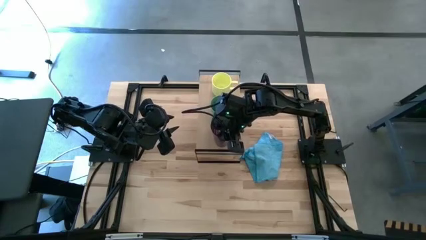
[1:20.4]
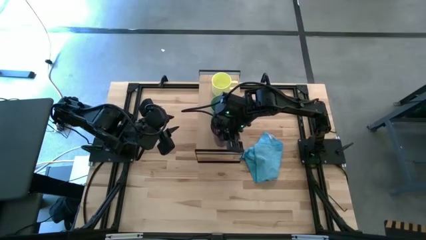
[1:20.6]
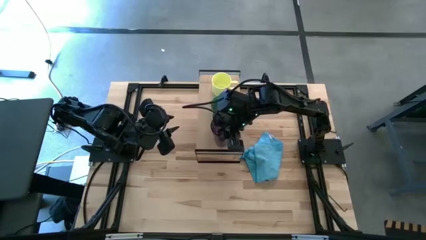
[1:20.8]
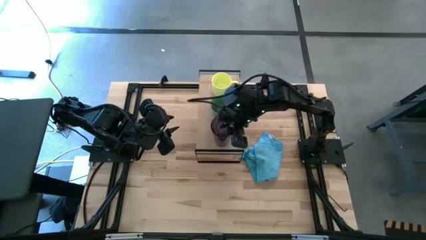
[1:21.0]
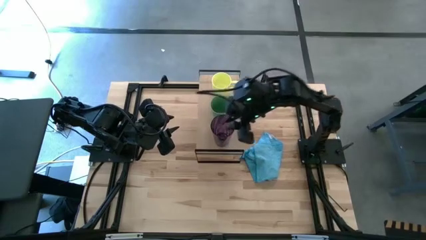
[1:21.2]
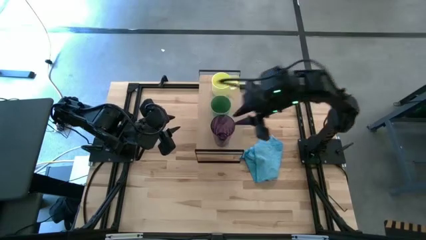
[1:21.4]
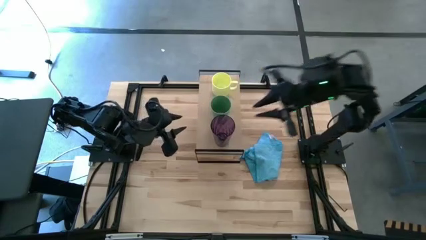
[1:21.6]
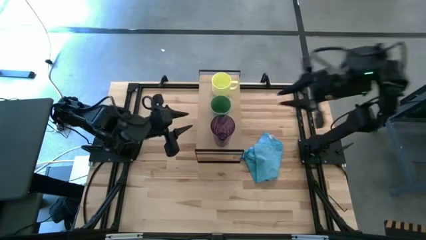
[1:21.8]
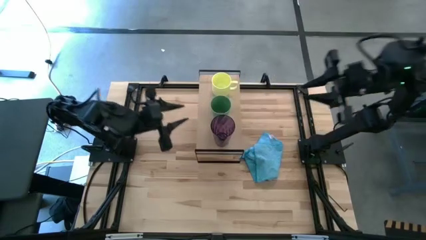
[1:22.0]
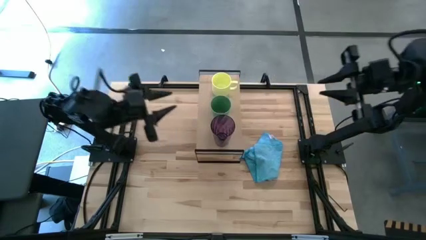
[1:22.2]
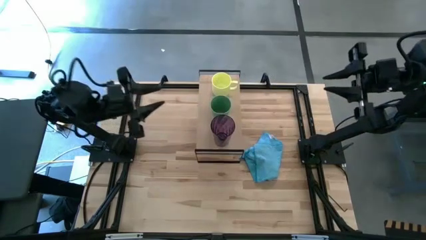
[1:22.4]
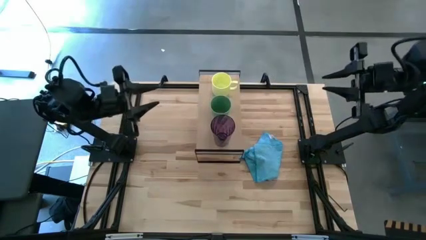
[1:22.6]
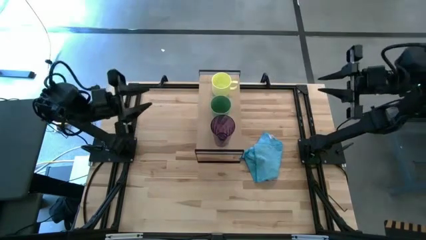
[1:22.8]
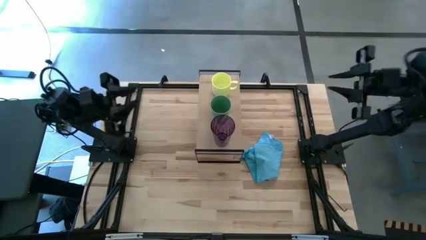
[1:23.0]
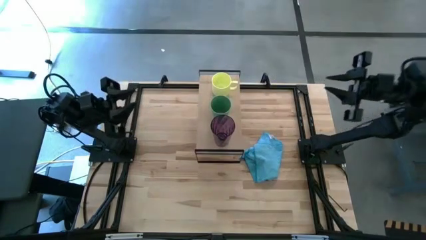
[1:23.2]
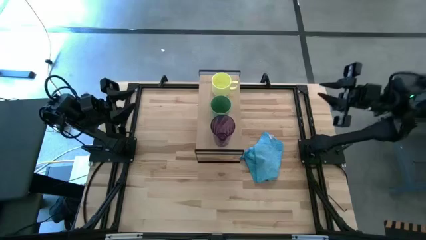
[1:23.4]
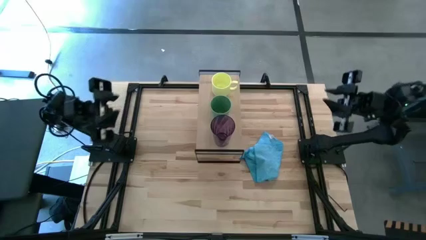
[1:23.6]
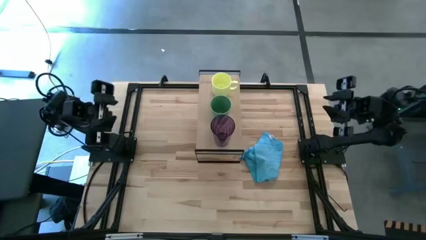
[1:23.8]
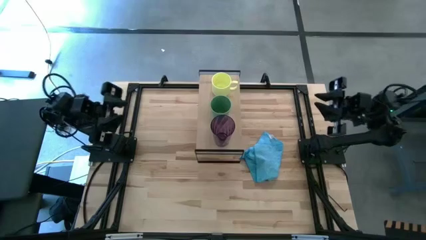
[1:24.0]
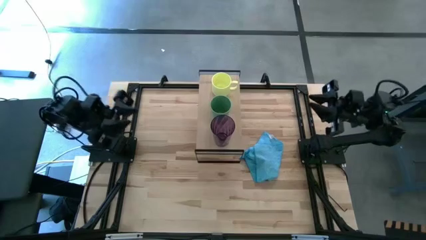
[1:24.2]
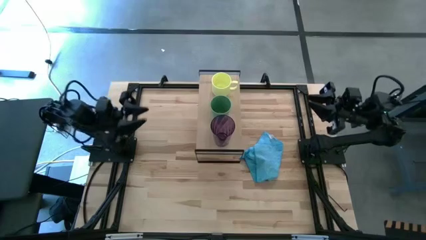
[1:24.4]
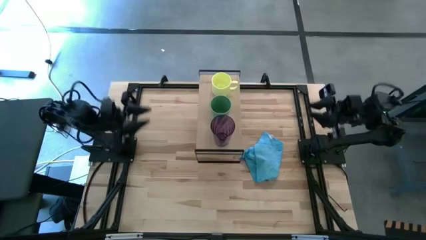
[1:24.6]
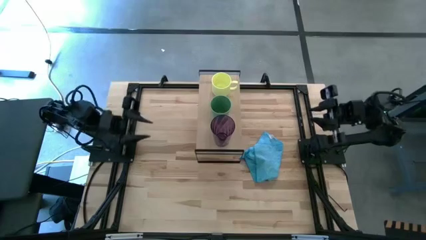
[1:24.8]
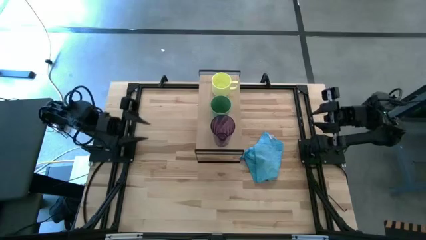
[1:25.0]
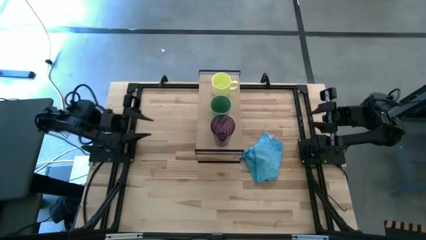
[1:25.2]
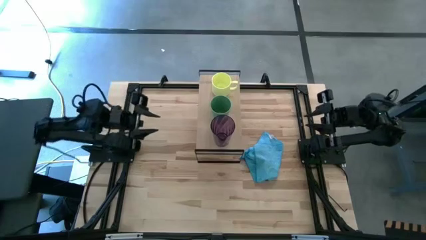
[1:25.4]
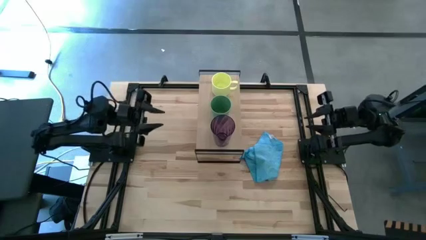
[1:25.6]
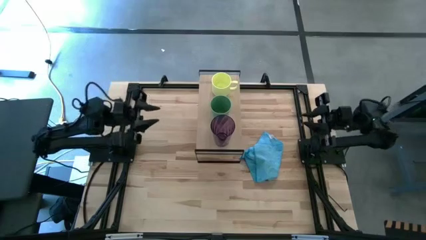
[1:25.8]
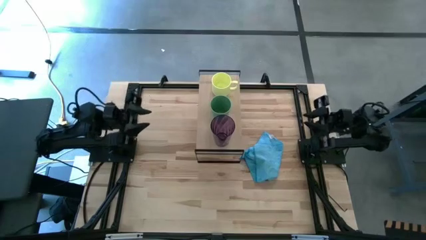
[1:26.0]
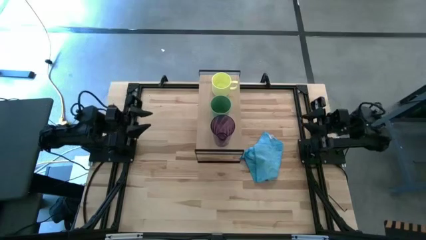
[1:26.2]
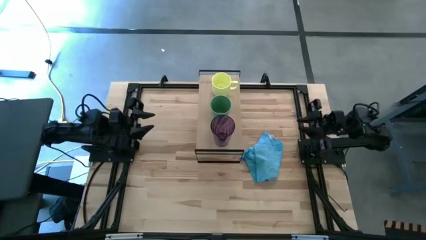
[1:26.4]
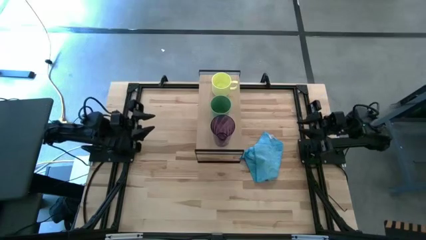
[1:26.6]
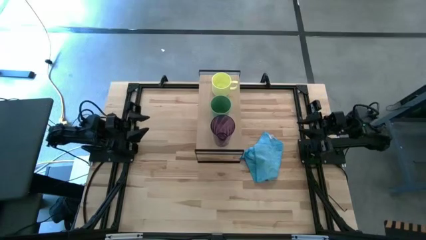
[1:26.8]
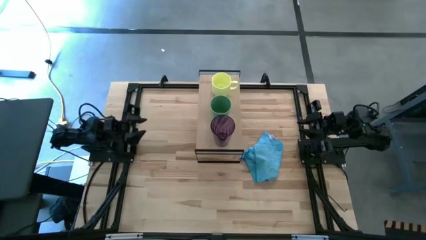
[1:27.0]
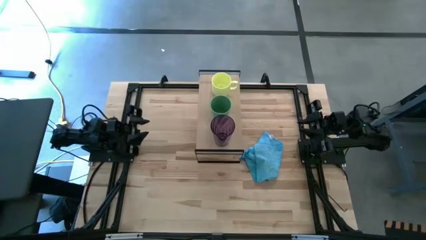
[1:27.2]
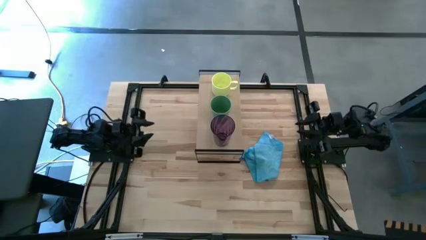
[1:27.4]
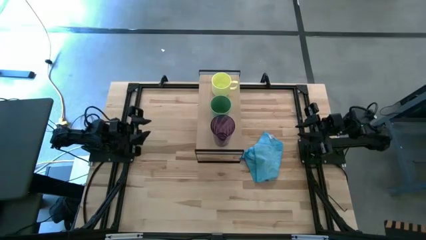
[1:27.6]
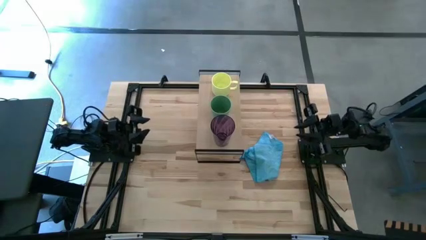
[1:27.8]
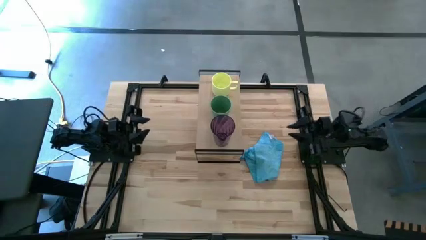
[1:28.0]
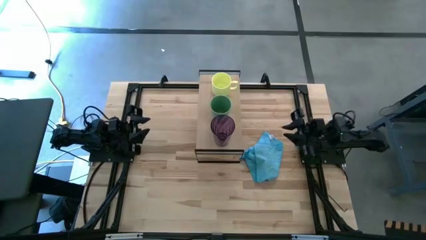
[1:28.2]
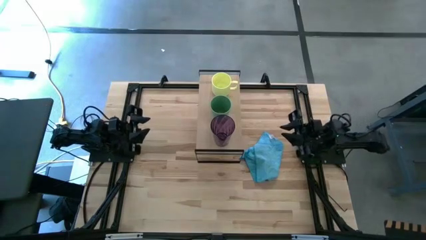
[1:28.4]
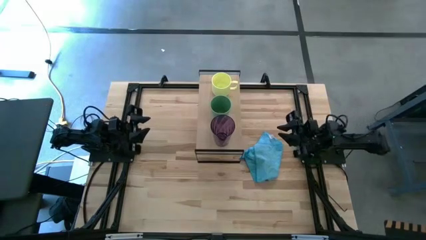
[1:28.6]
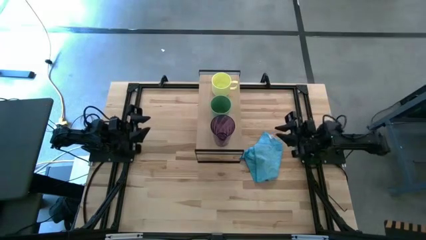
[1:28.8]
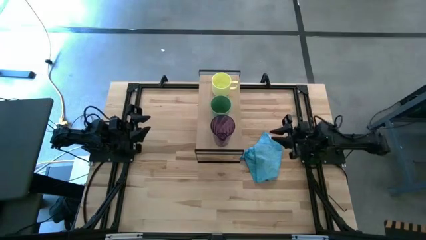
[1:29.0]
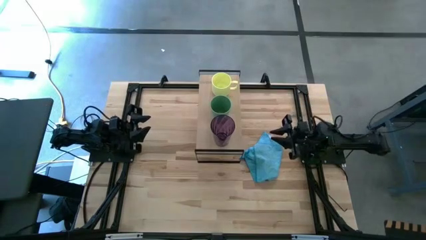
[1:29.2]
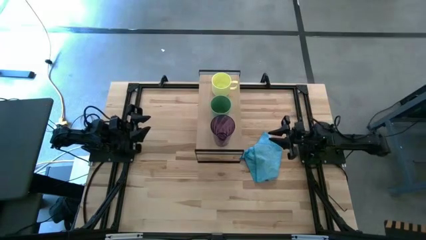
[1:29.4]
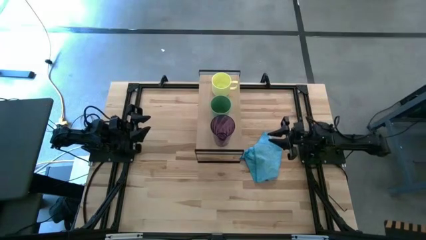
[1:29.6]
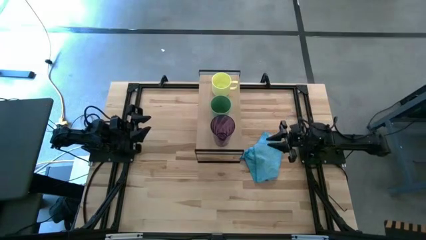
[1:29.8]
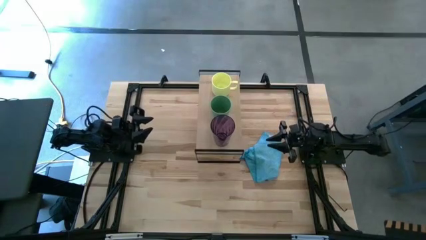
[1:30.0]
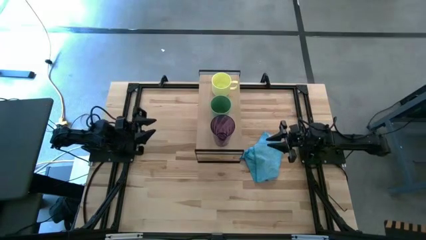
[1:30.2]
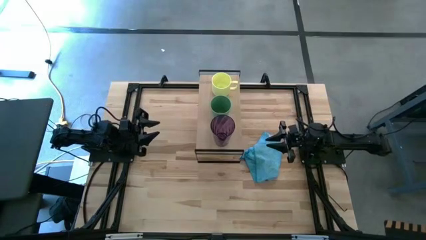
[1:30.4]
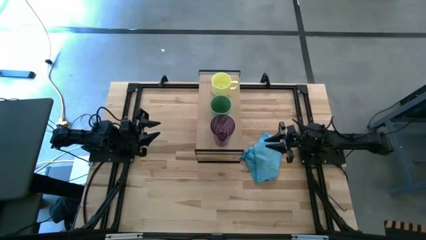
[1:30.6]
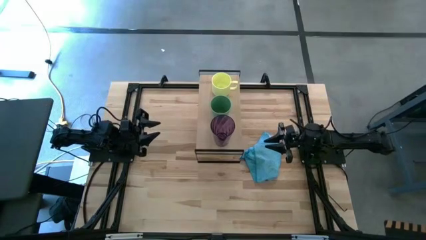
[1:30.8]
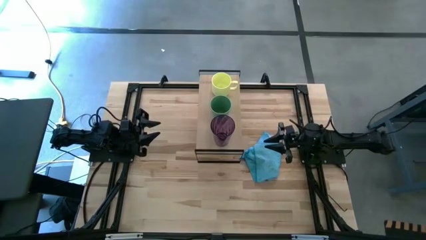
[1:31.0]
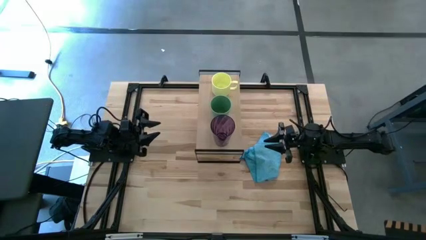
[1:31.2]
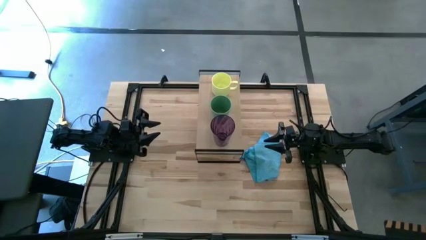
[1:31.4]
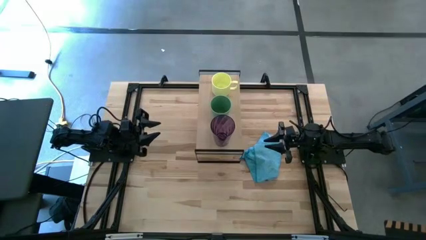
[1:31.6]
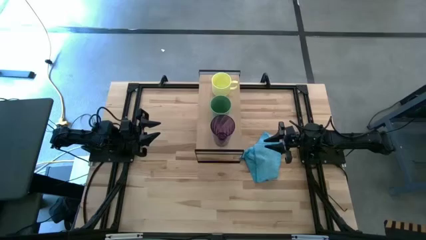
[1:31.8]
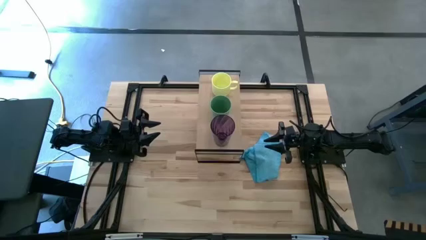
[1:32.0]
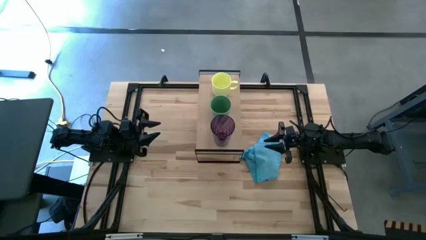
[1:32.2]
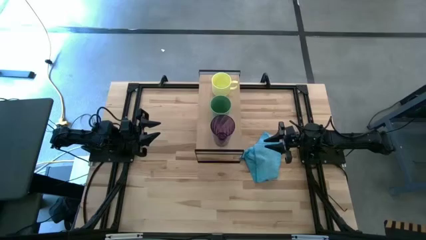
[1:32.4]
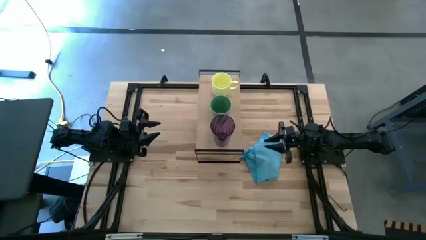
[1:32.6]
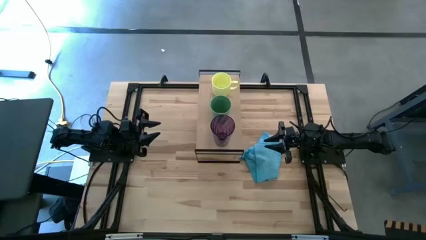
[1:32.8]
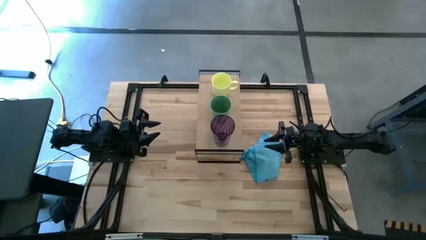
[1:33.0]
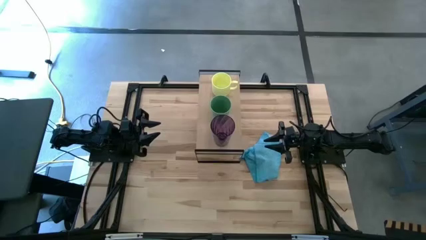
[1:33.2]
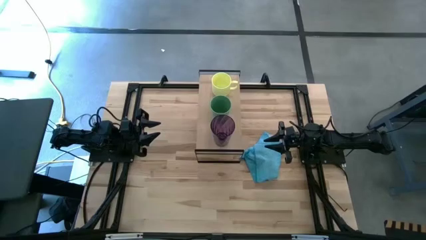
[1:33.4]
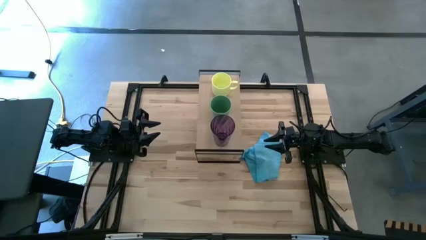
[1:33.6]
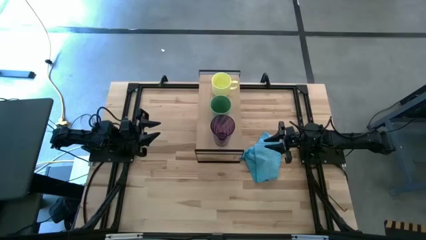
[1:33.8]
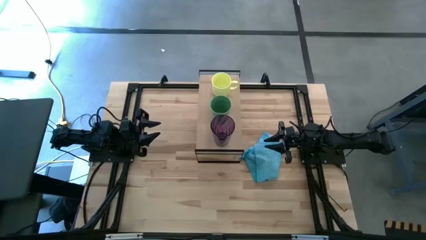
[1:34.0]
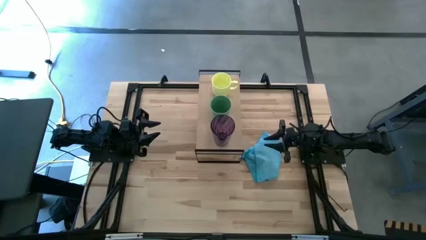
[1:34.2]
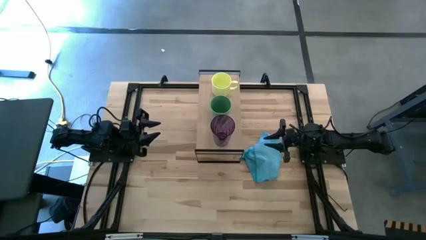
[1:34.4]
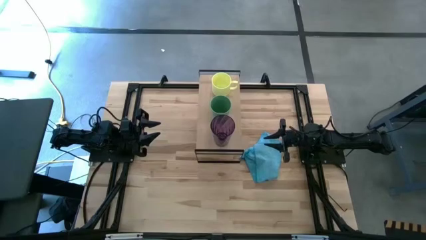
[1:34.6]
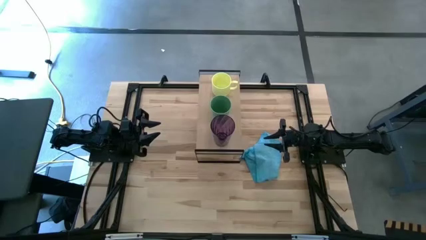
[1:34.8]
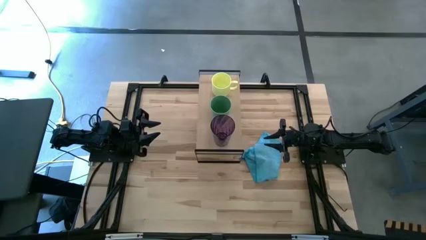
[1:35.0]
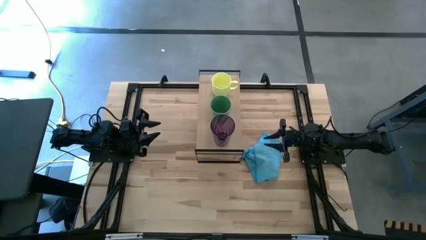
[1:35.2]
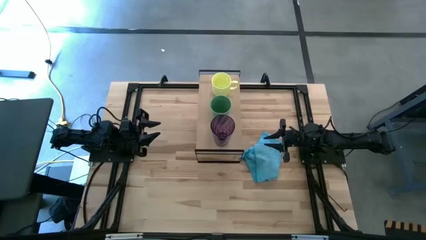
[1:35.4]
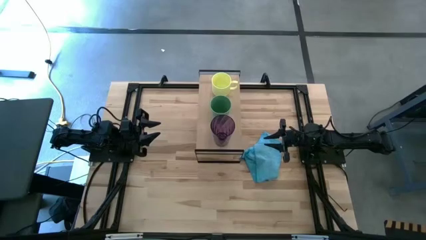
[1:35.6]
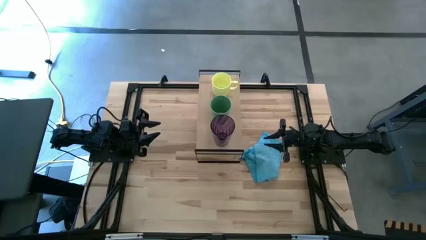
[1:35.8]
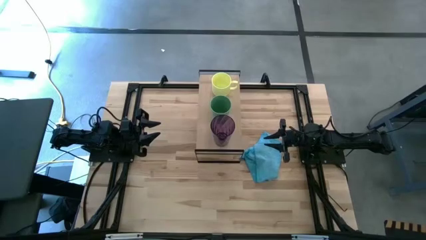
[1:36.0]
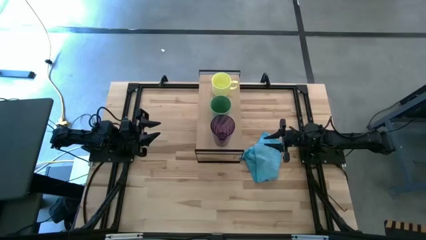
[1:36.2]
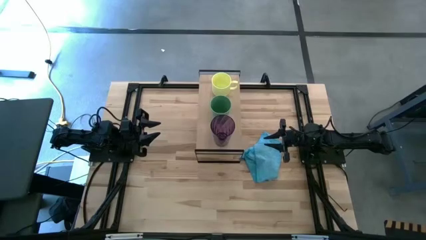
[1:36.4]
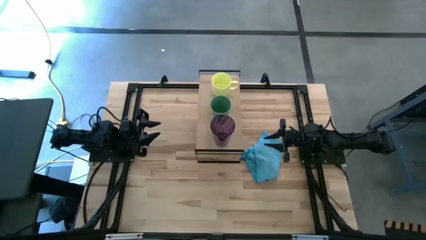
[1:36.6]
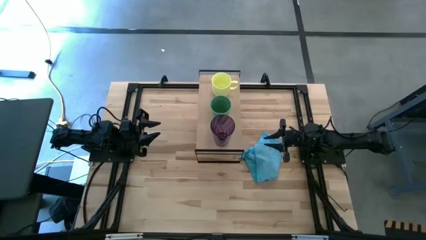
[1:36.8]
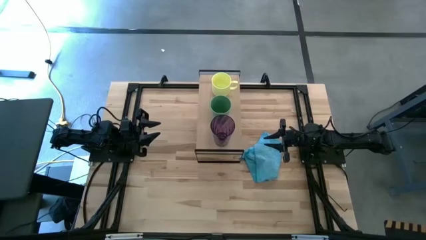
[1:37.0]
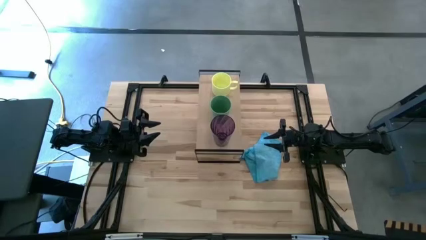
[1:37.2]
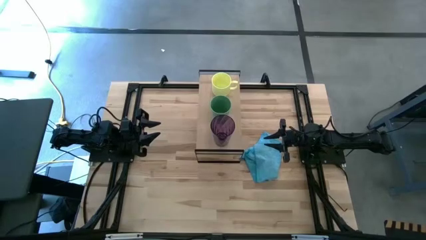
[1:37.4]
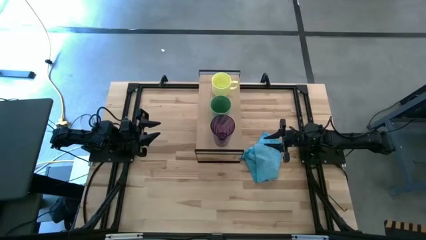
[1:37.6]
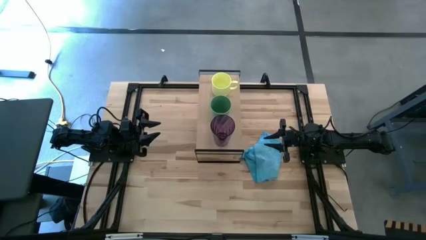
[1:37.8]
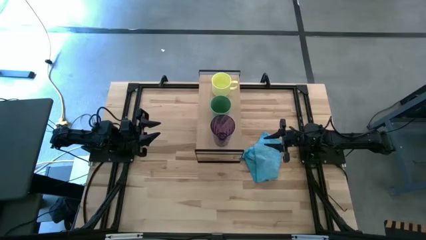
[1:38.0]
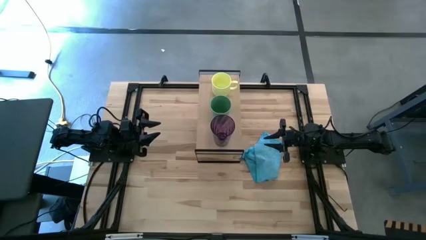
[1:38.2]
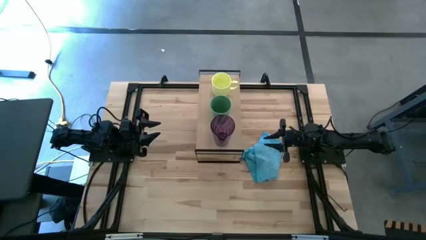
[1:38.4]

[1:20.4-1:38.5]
Task: Stack small to large cups/mugs on shelf
Return to Home Position
